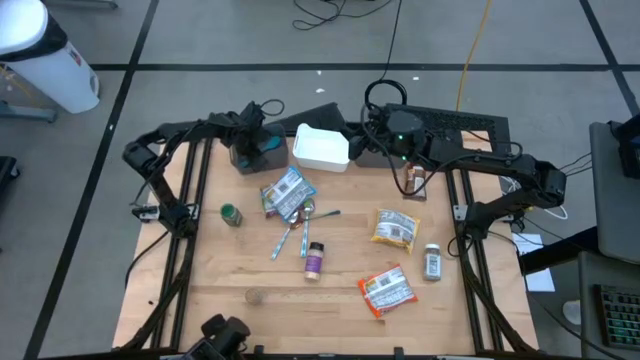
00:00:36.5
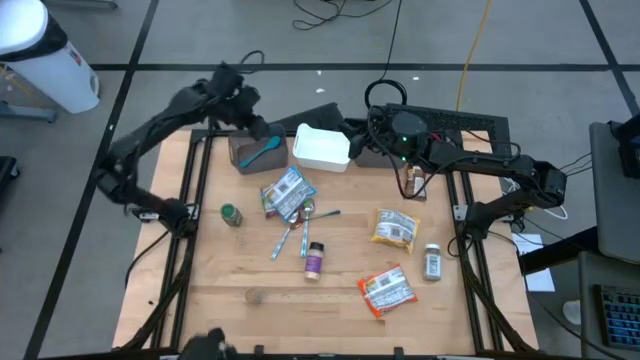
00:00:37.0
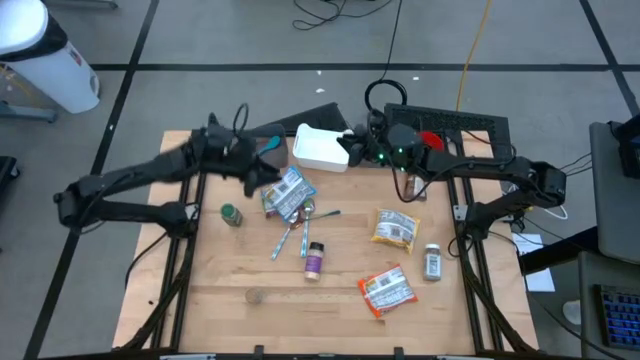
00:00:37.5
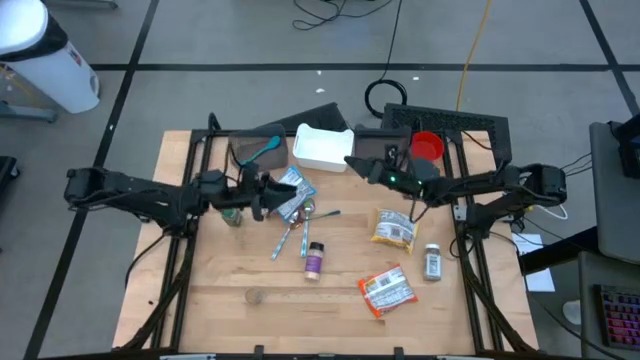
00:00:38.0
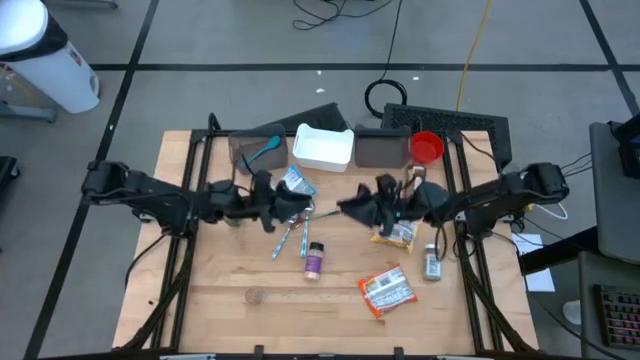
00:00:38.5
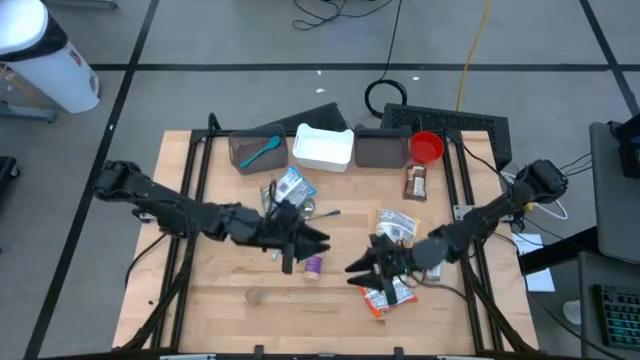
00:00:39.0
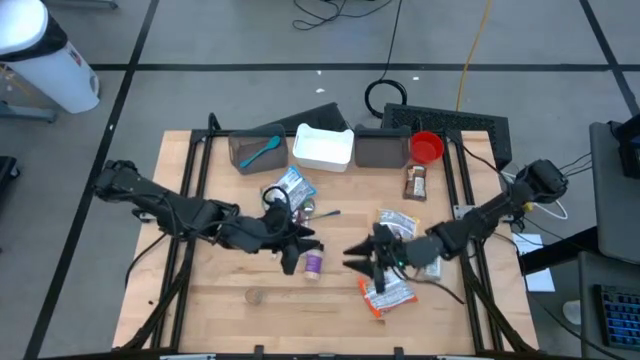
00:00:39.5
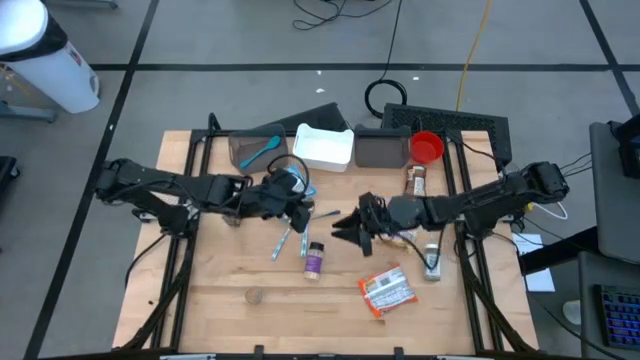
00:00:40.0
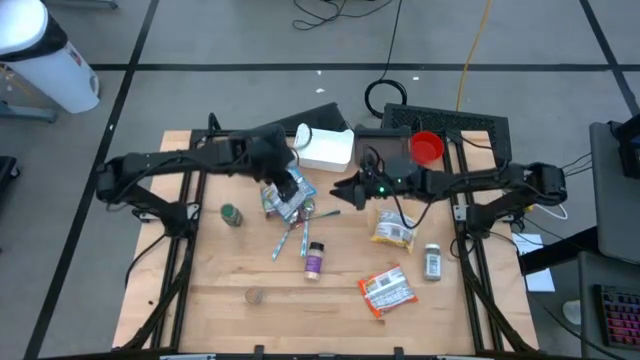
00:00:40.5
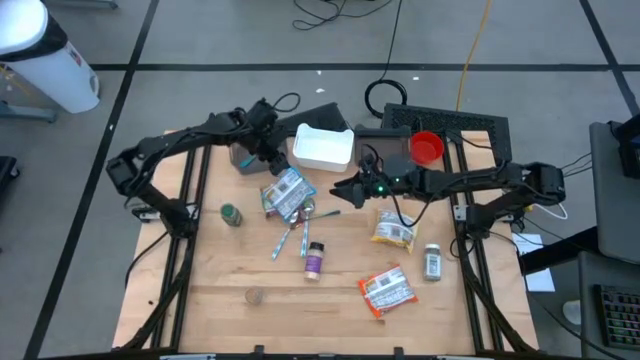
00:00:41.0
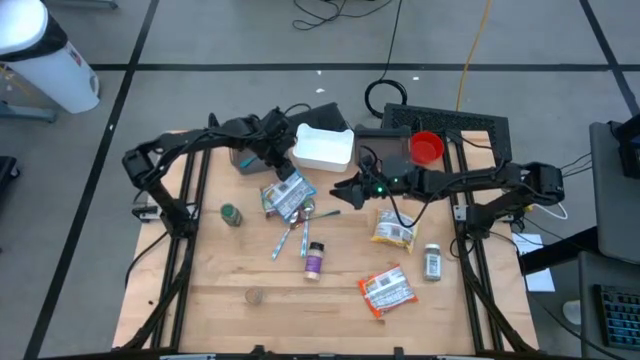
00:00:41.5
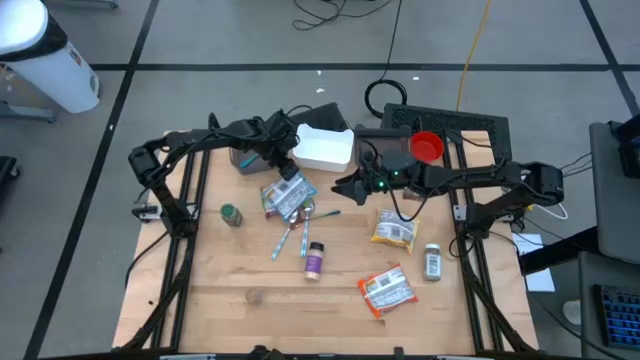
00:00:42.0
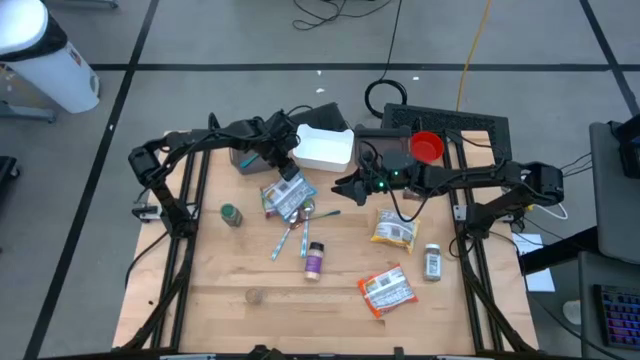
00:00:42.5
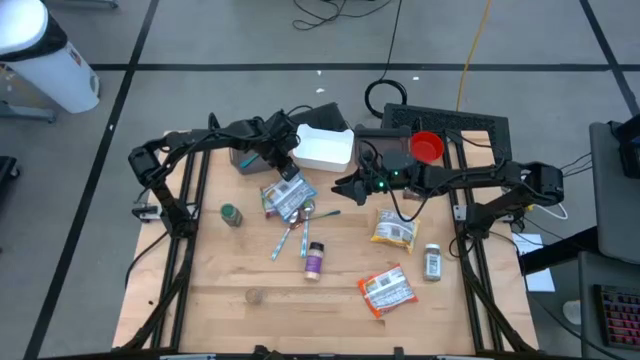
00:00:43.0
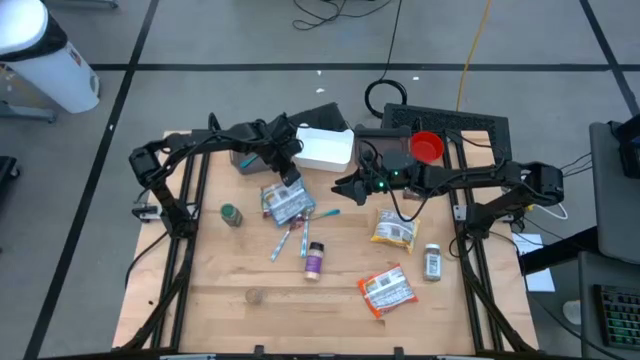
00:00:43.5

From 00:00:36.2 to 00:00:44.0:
Task: Pick & Place Food Item
Put the blue noodle pack into the right black bin

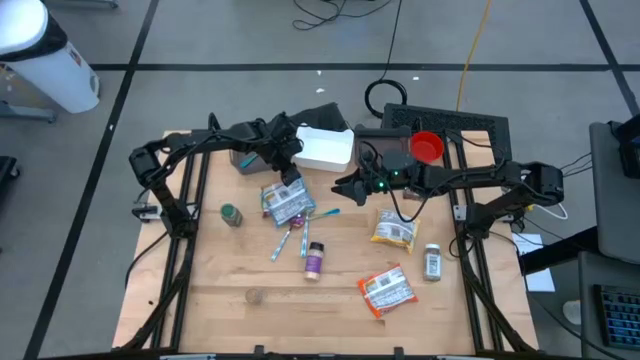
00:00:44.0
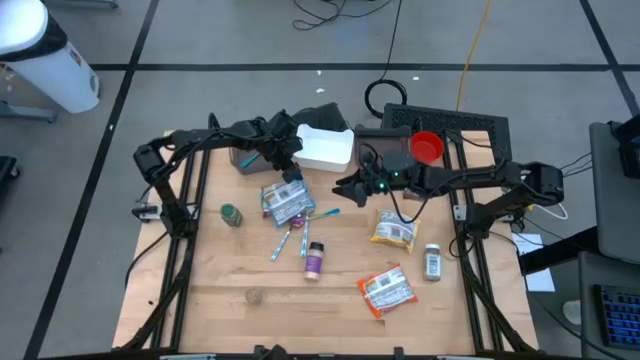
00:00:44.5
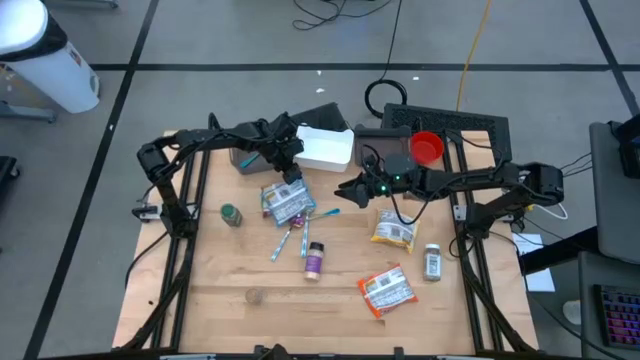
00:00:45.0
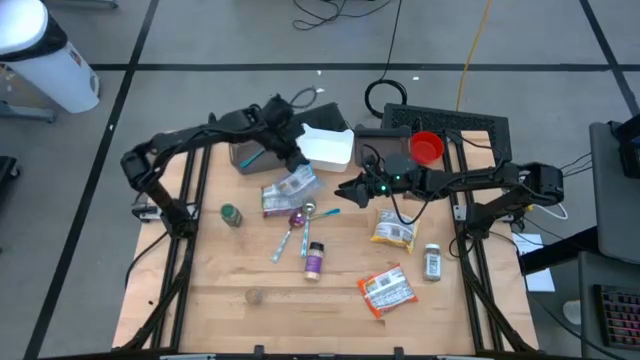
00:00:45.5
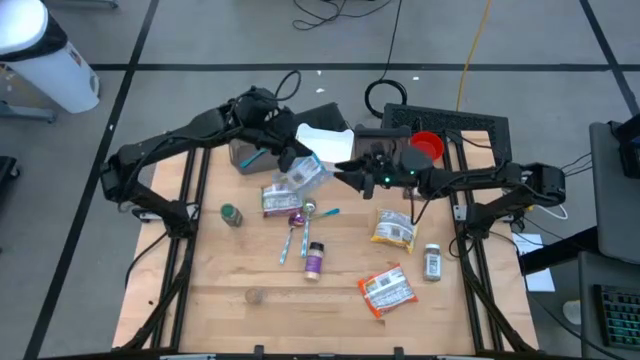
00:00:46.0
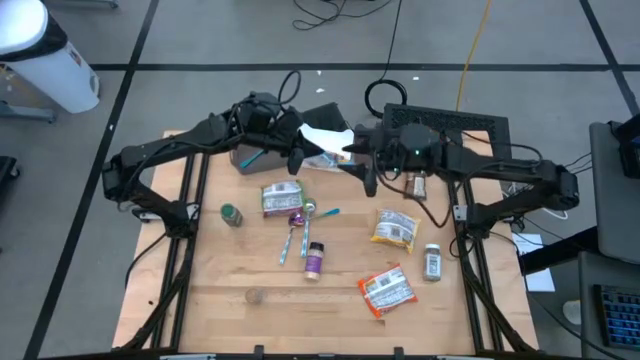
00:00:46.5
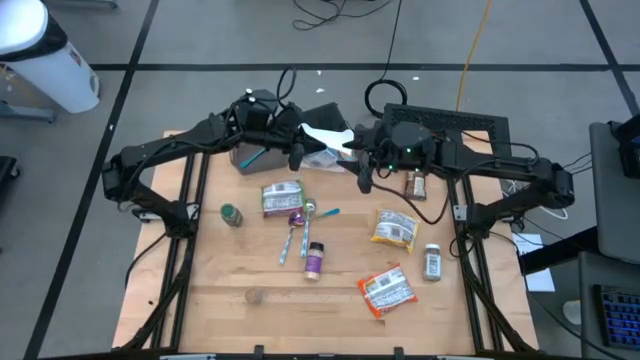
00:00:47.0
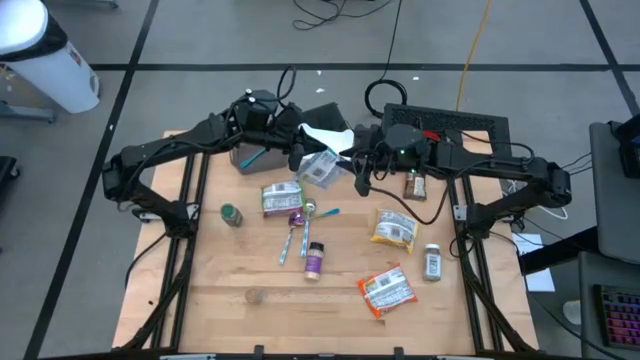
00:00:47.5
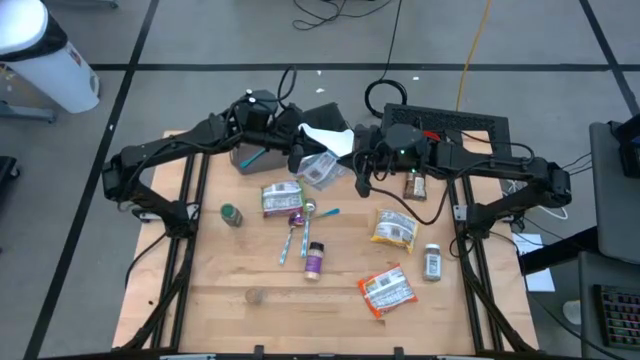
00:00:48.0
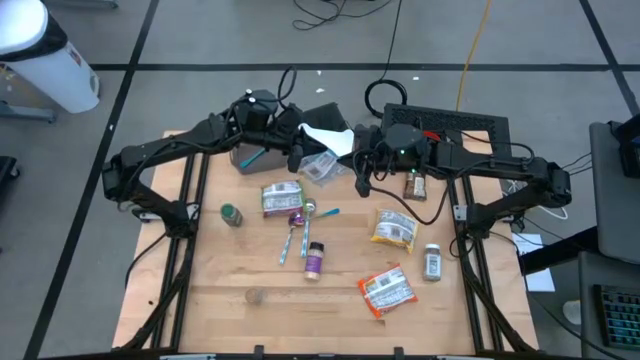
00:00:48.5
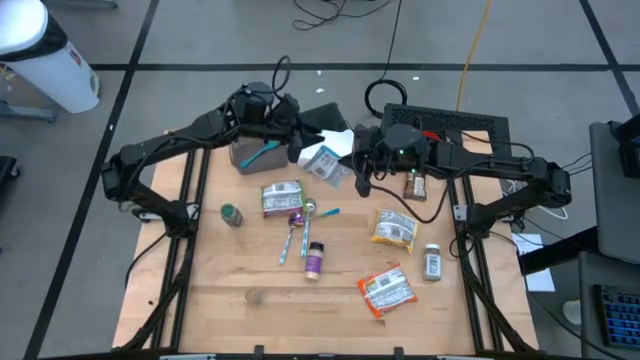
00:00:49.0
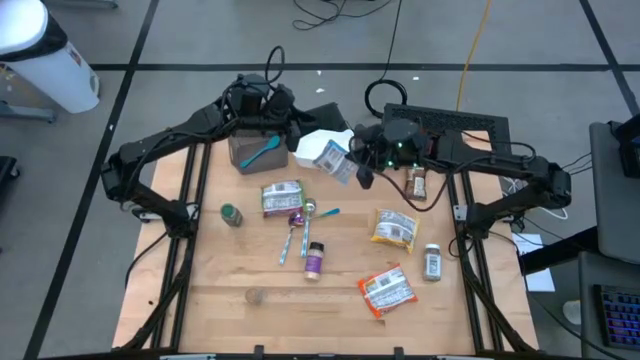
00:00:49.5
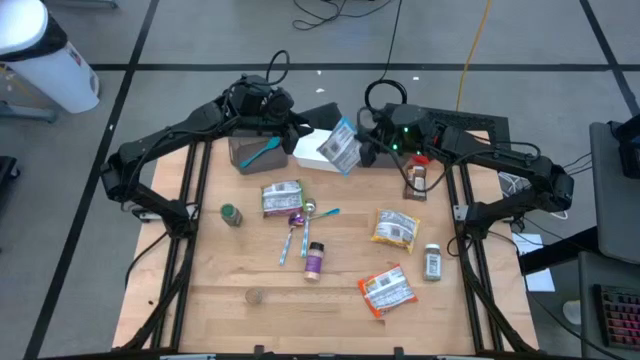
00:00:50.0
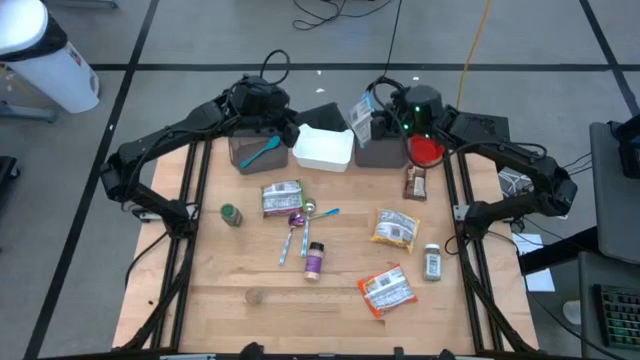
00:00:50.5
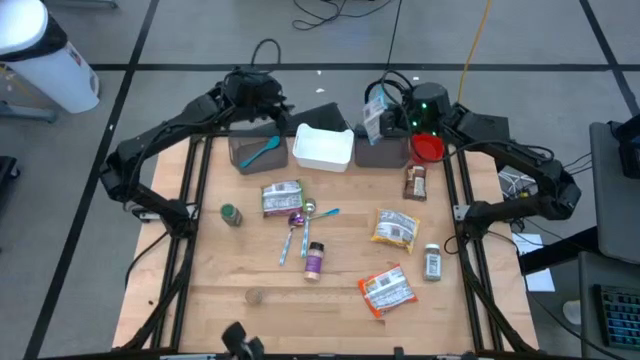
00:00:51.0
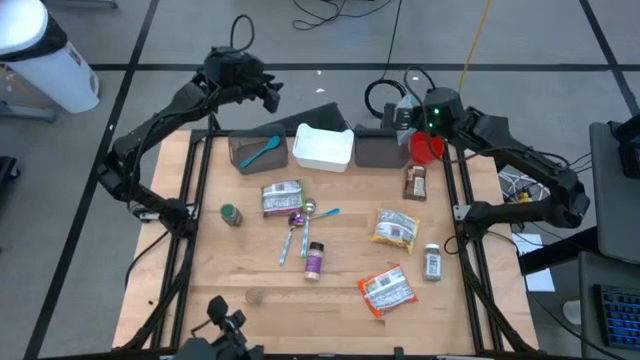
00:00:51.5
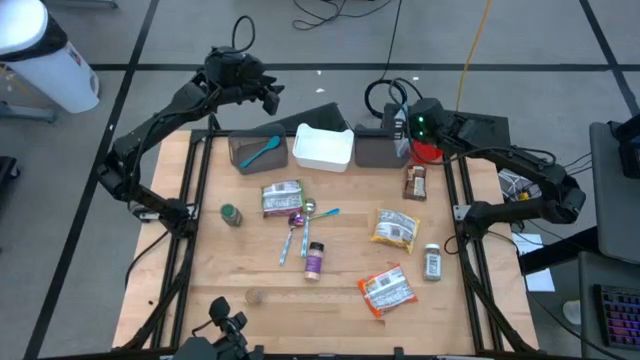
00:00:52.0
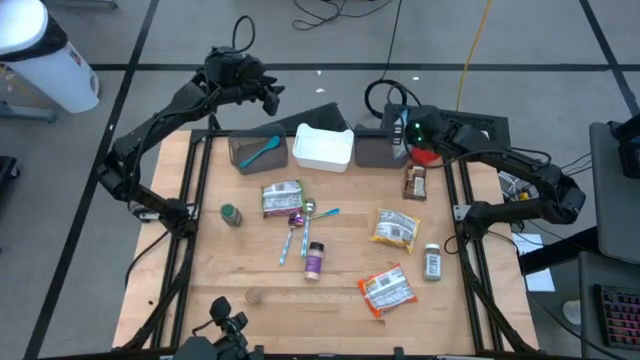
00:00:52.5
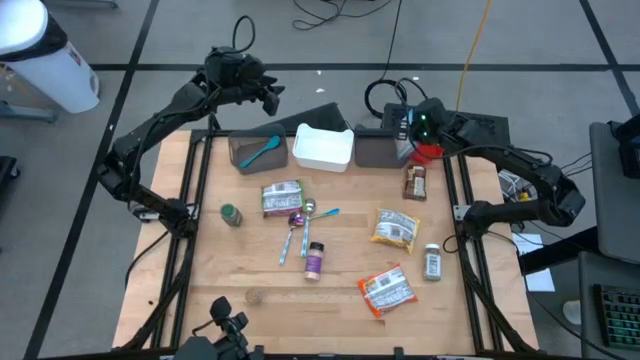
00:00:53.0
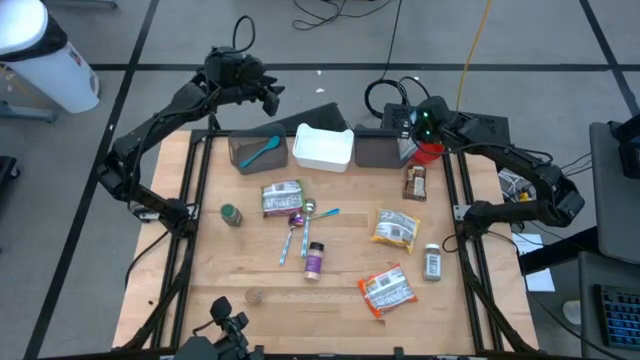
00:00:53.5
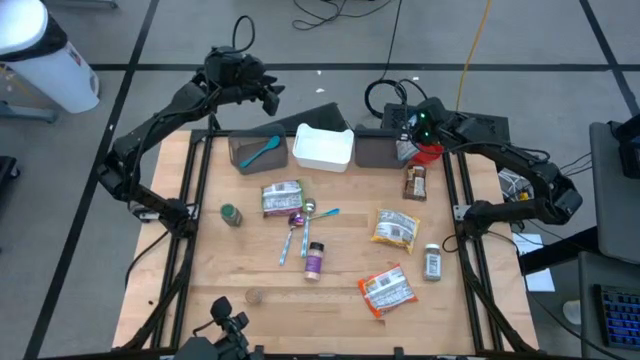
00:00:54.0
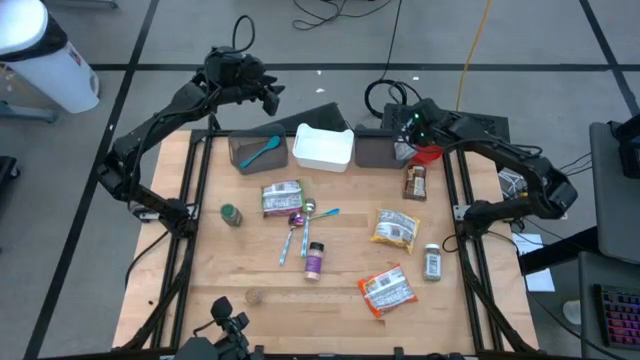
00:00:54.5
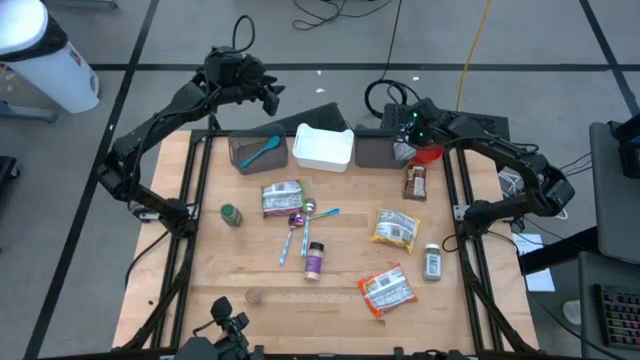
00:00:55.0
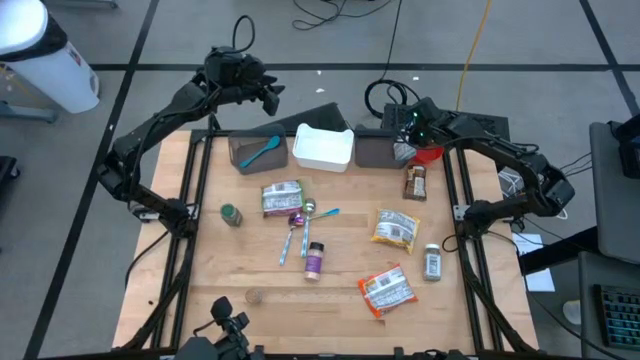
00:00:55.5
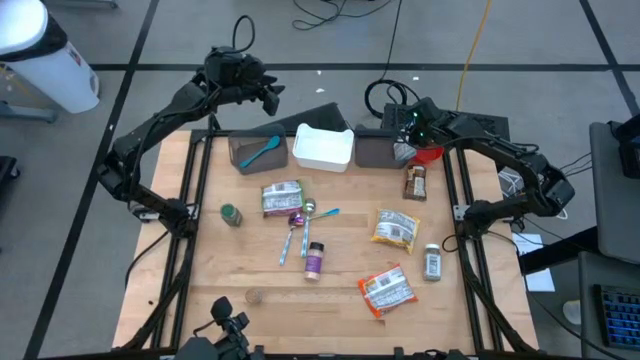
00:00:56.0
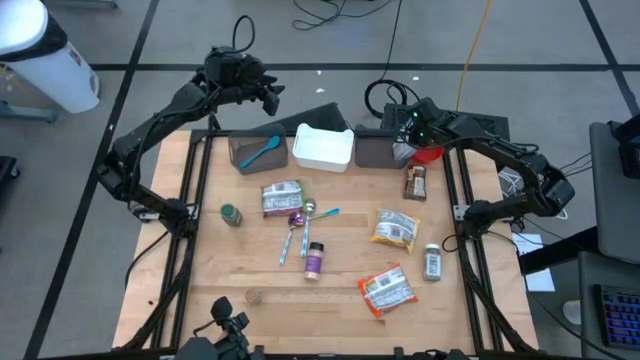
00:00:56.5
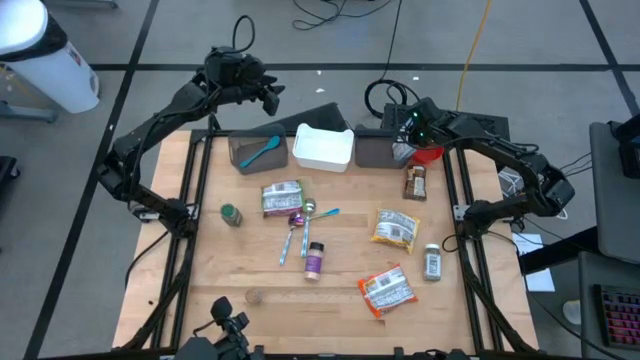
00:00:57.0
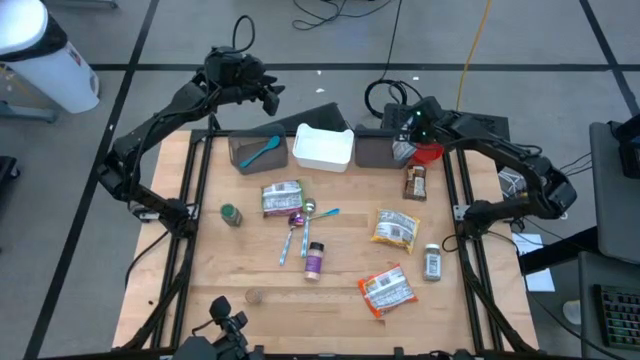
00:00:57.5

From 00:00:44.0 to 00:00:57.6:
Put the blue noodle pack into the right black bin
